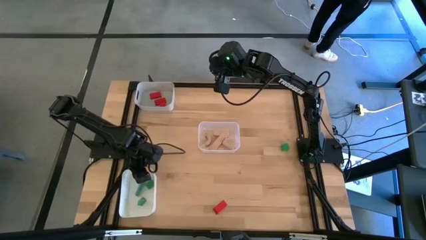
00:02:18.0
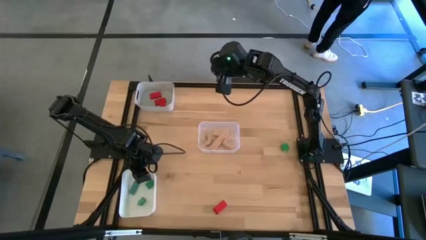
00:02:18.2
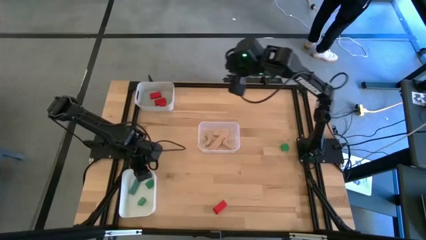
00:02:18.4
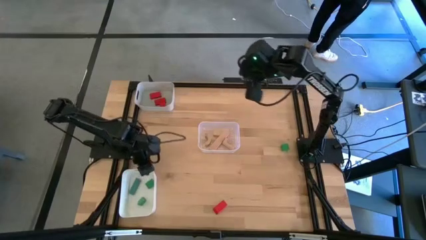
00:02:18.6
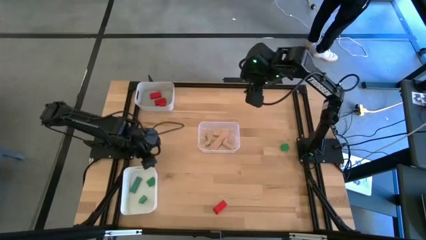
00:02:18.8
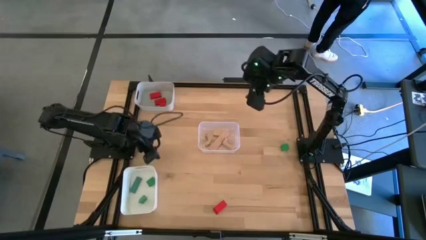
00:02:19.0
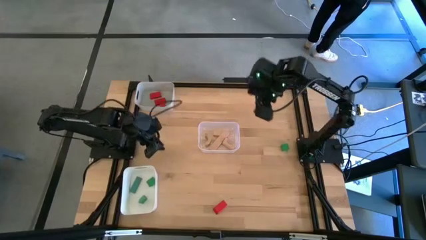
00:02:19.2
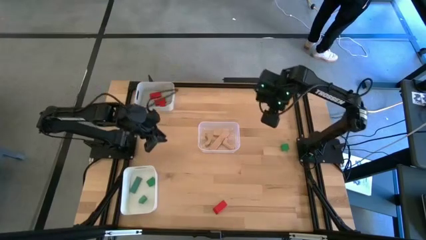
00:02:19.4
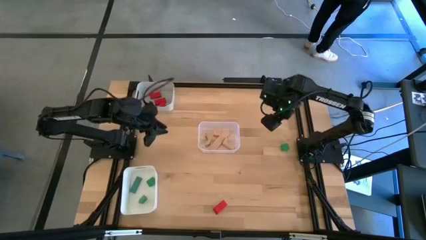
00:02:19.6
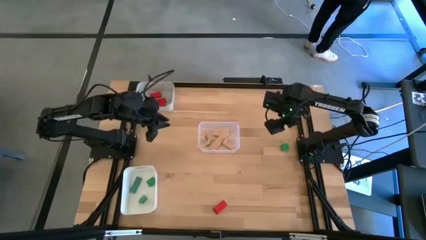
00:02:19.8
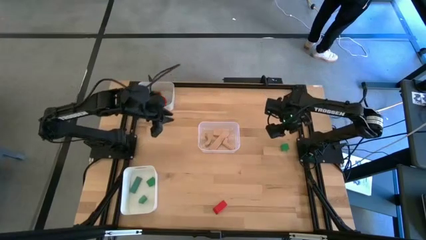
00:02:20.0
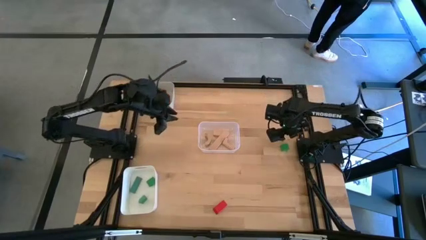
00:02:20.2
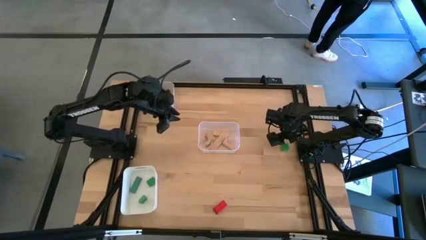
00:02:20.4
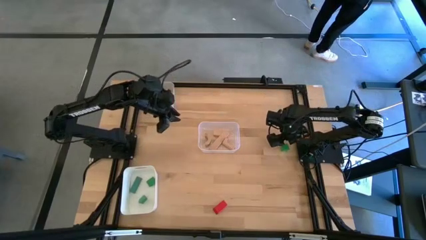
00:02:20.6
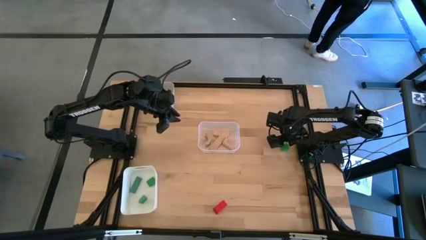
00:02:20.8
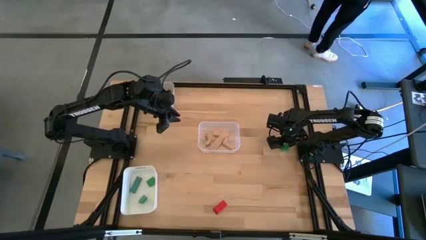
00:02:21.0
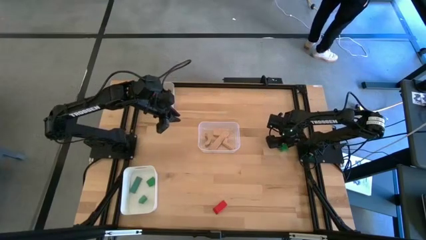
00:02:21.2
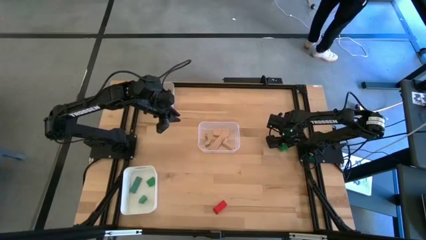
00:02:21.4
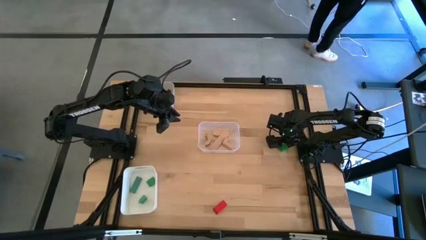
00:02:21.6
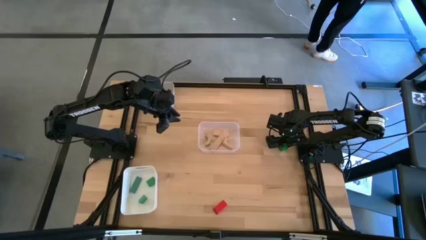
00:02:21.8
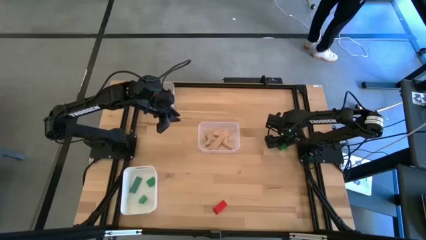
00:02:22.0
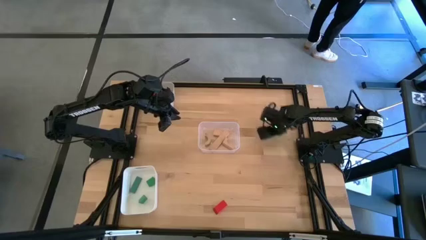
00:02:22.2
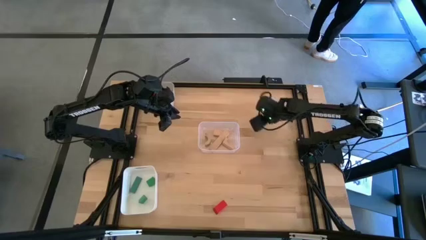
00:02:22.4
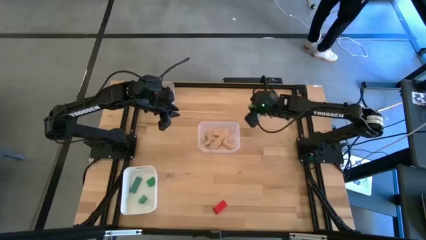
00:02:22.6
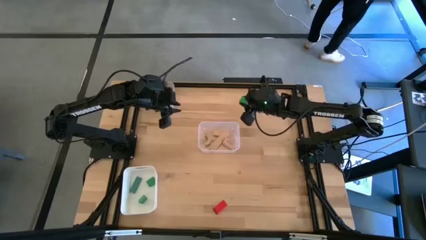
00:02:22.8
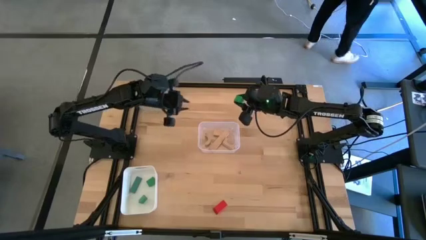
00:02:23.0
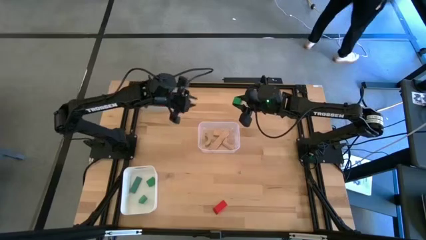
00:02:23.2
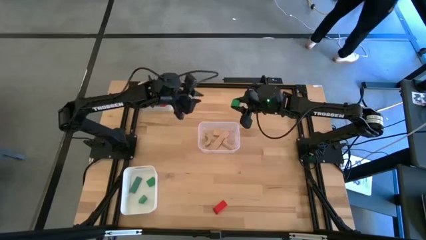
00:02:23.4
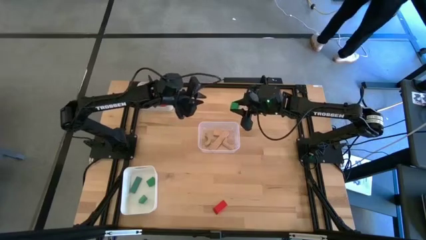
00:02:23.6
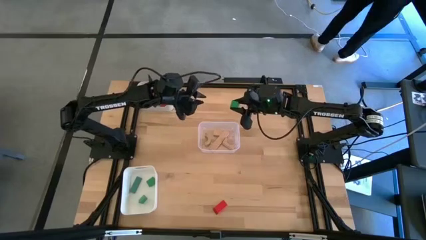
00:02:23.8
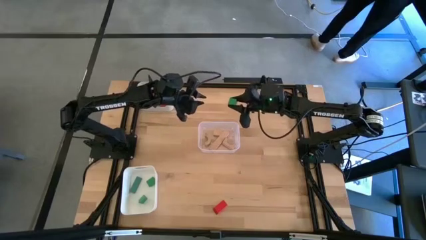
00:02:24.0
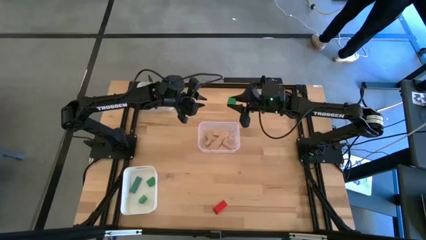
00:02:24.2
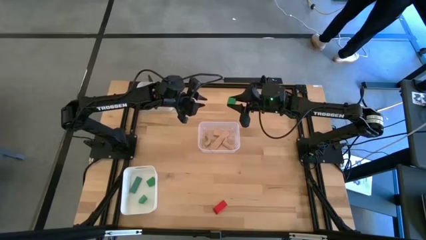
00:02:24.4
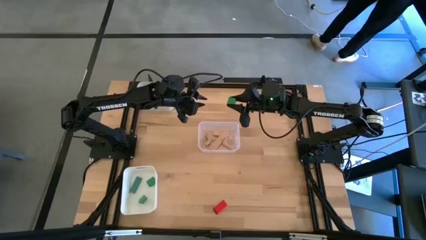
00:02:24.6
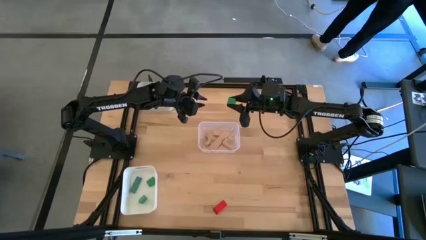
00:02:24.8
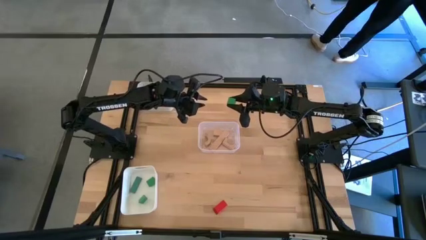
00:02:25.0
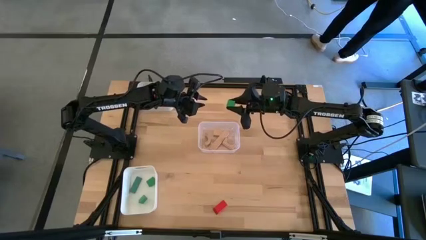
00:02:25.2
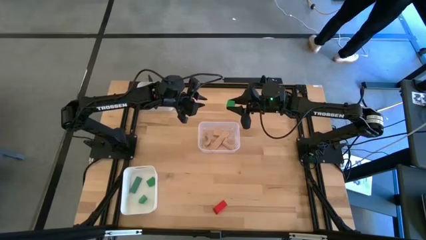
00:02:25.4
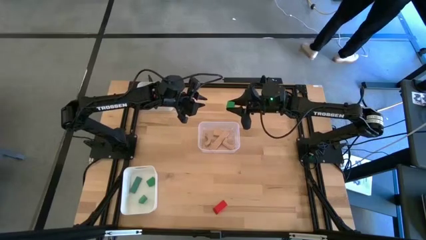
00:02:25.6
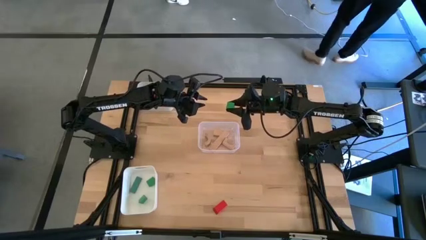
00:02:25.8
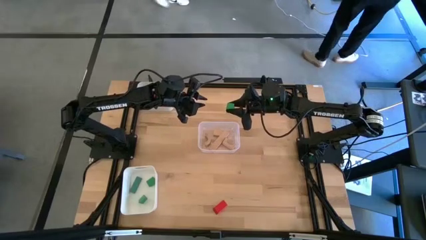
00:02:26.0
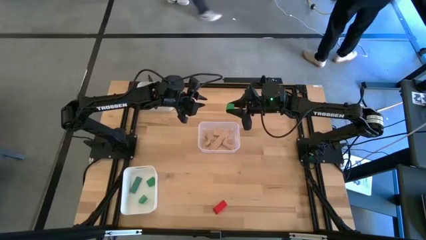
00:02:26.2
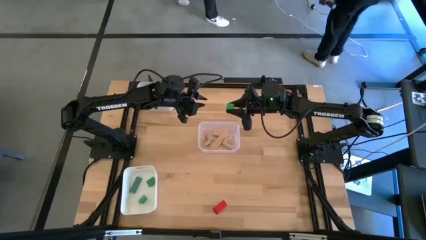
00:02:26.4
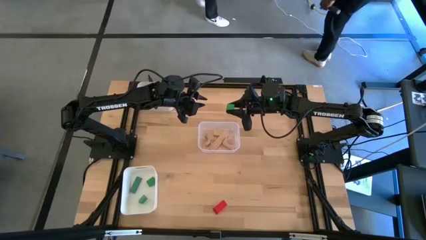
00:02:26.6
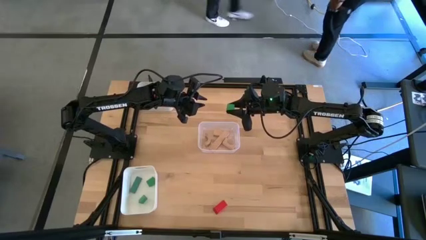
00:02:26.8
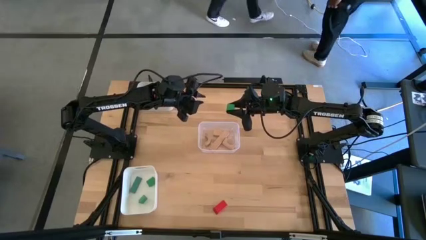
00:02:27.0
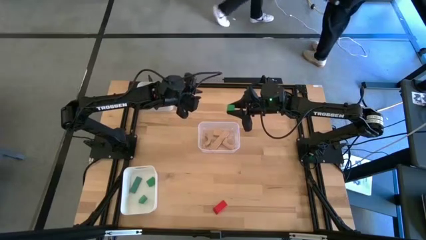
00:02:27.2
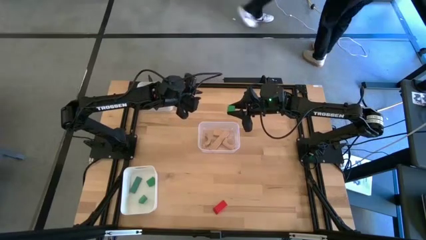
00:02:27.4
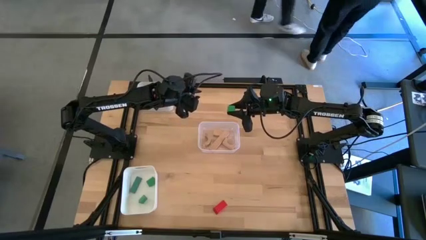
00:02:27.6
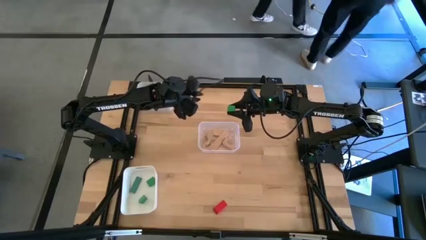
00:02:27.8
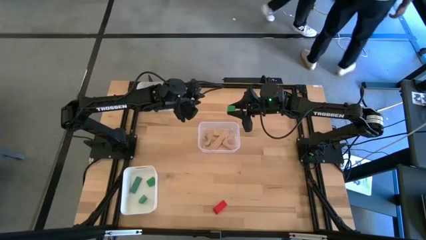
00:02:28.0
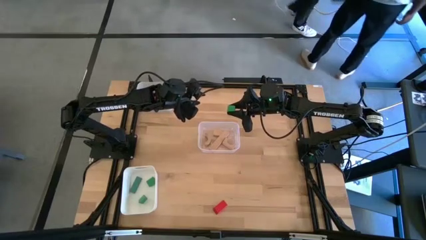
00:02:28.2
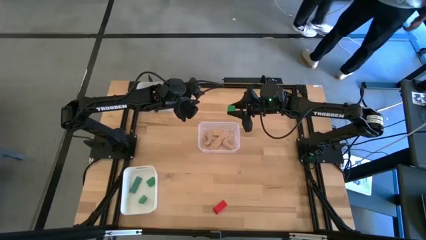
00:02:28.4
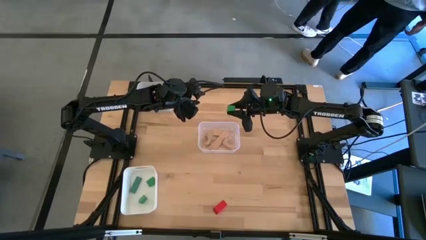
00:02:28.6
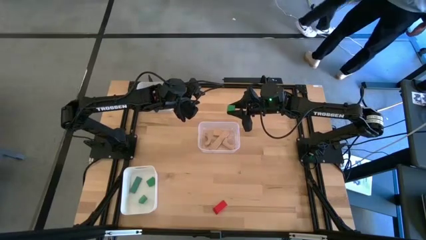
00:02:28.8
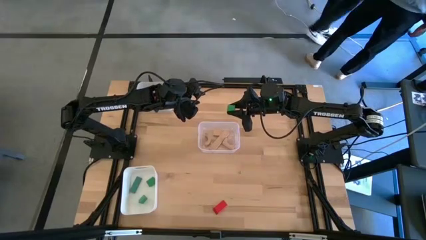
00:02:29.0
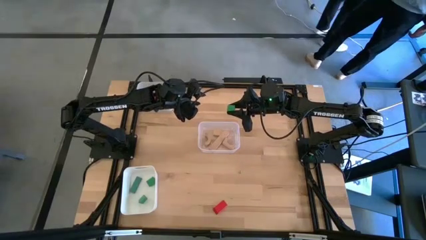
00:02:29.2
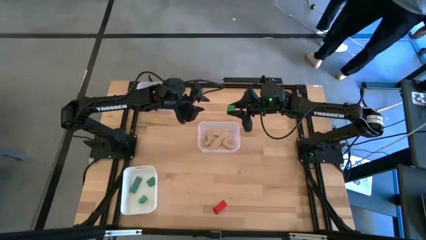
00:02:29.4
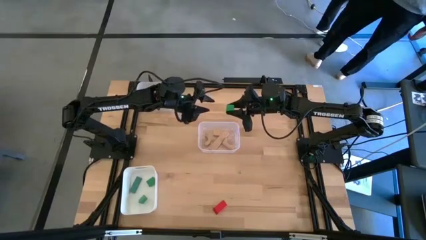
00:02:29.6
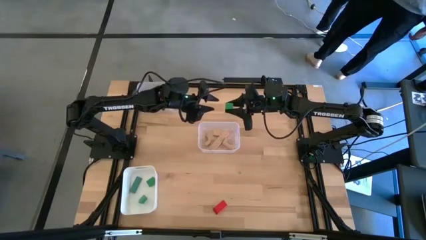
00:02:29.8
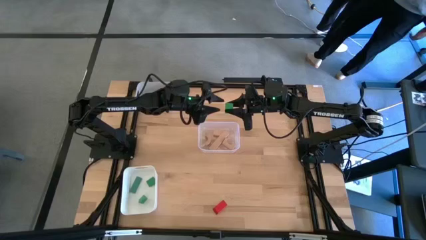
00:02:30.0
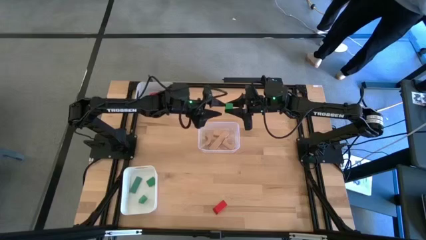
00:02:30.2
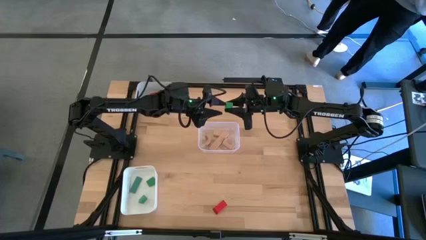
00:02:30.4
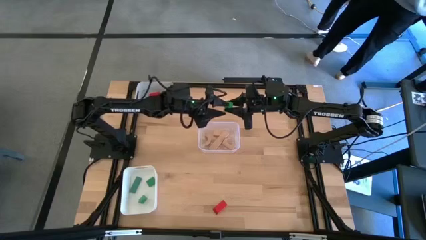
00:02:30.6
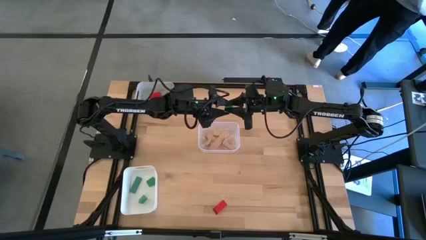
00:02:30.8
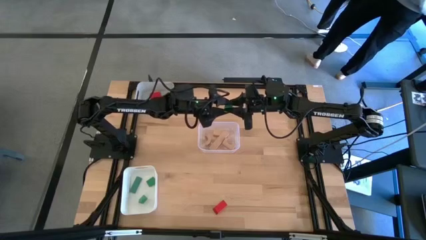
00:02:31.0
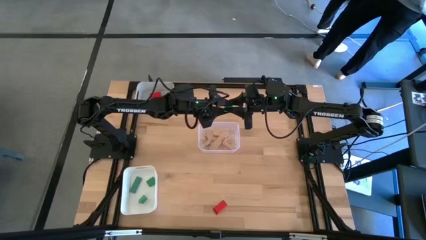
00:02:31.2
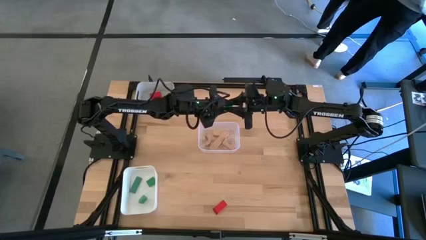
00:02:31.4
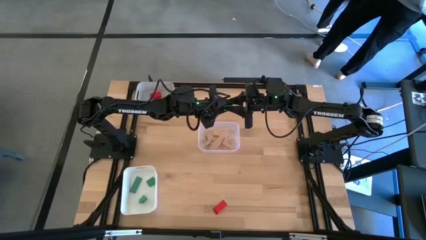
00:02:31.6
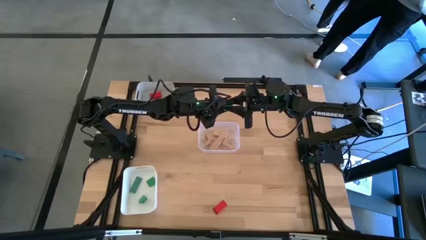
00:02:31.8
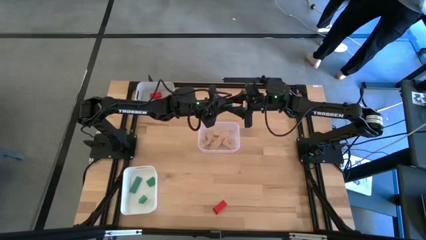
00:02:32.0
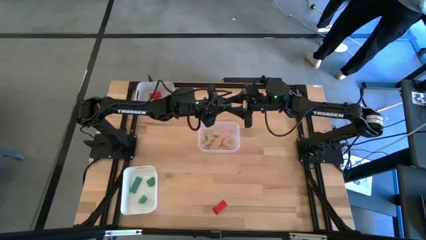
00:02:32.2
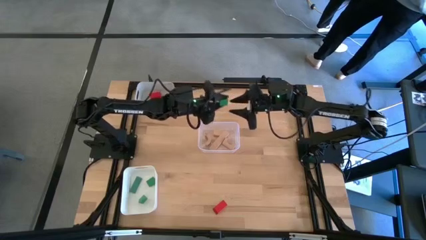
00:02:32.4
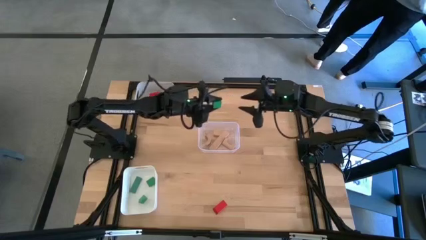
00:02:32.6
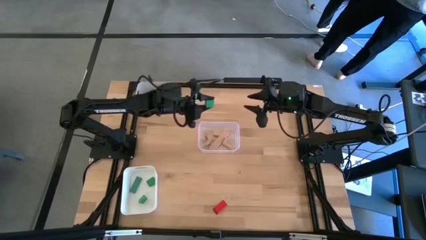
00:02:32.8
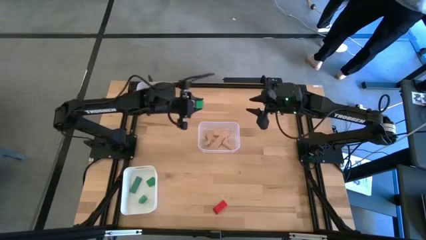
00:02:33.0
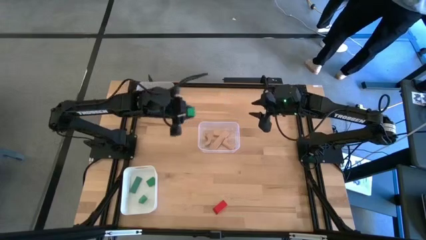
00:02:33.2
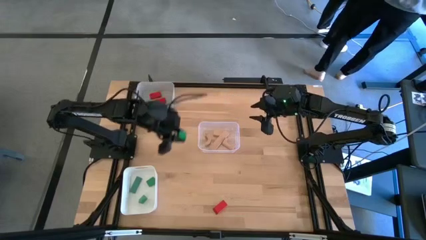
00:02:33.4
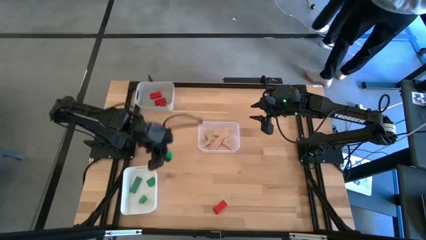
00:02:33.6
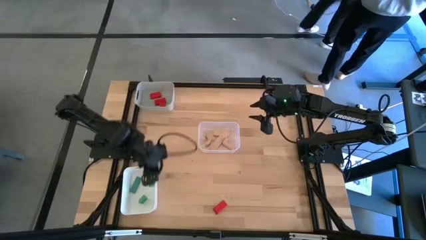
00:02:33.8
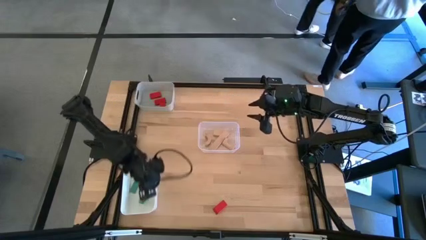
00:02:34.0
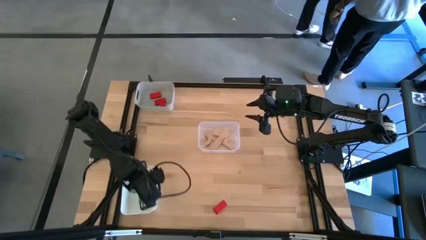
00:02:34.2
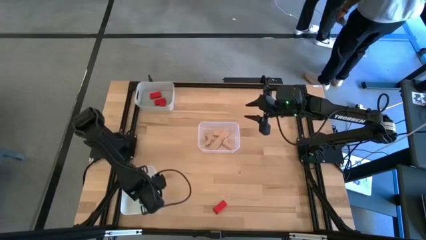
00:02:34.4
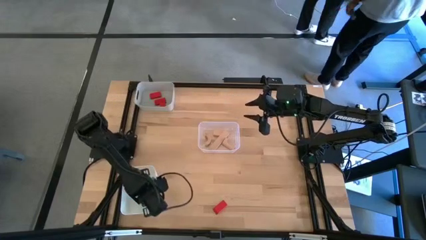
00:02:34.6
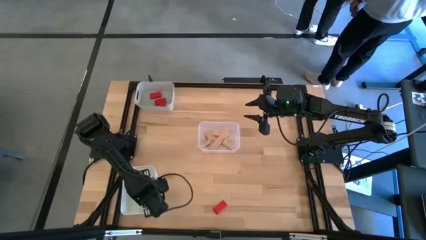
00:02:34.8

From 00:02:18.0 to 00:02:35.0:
Task: Sort & place blocks by color
Put the green block into the white bin
